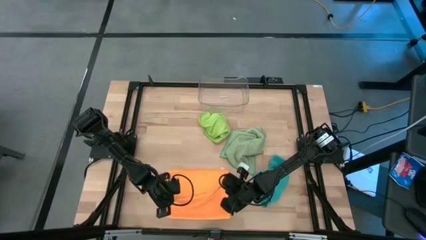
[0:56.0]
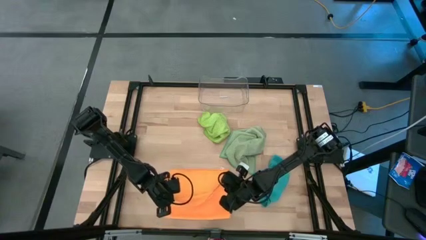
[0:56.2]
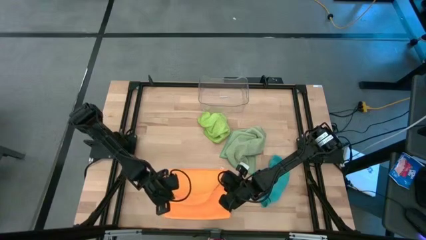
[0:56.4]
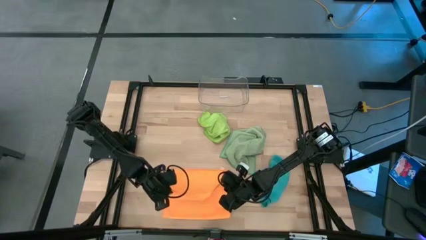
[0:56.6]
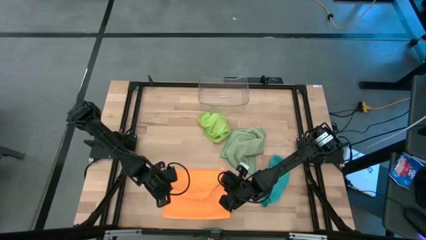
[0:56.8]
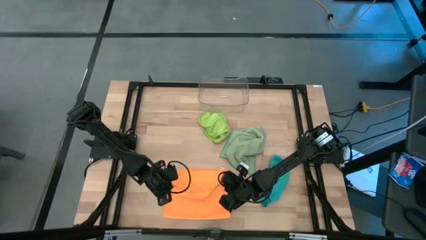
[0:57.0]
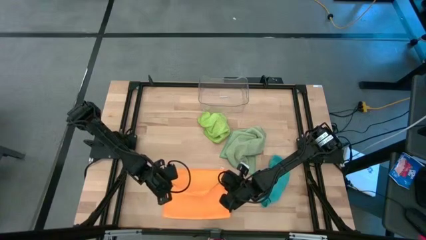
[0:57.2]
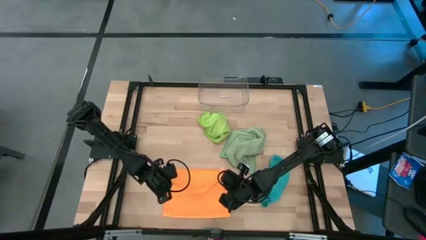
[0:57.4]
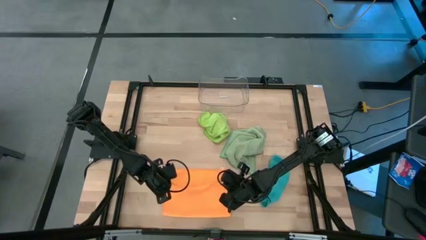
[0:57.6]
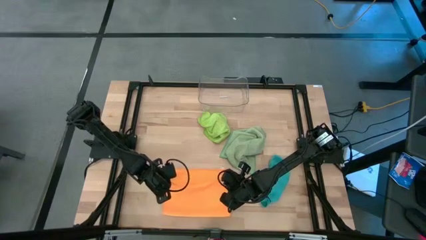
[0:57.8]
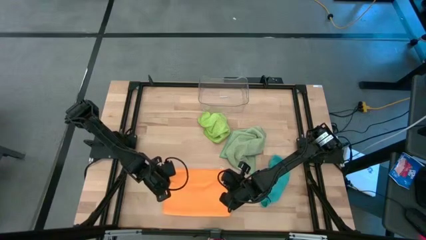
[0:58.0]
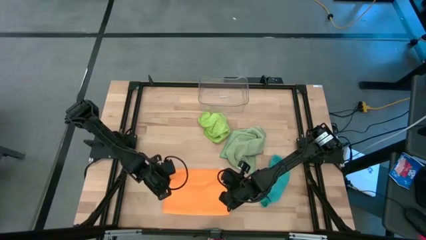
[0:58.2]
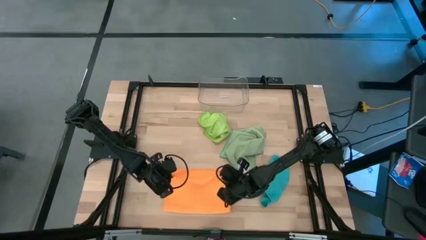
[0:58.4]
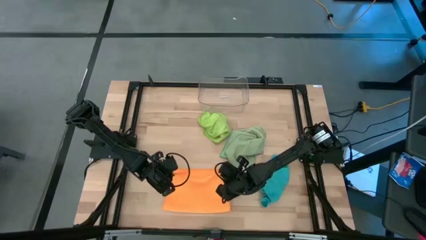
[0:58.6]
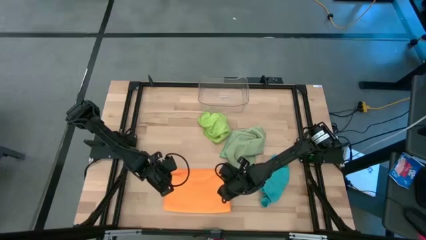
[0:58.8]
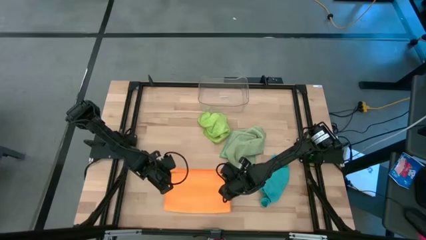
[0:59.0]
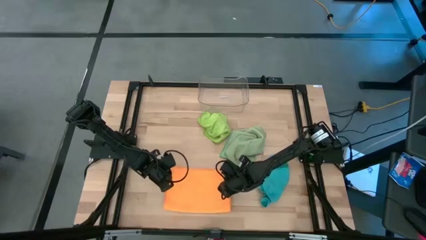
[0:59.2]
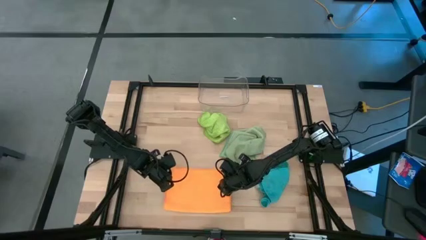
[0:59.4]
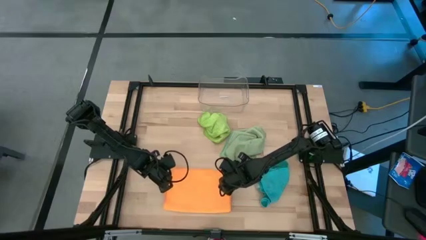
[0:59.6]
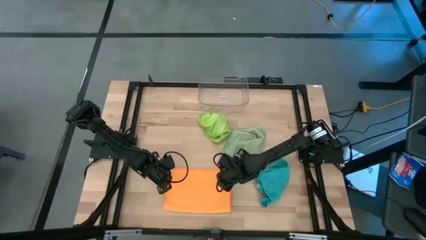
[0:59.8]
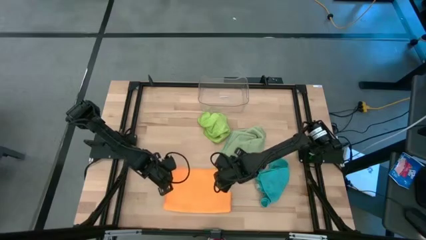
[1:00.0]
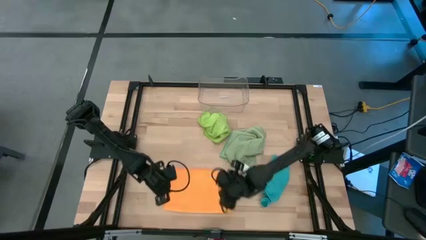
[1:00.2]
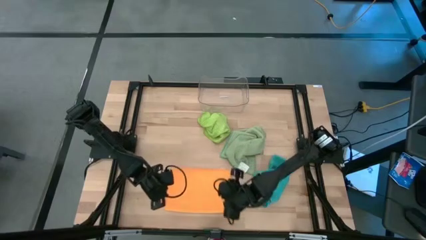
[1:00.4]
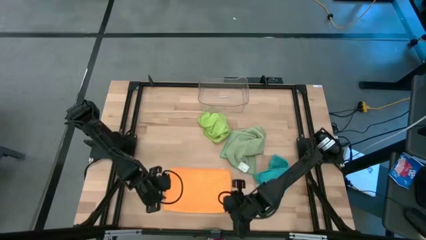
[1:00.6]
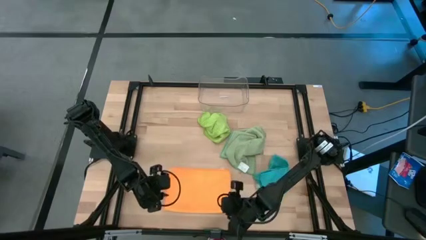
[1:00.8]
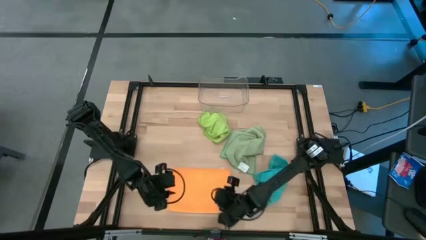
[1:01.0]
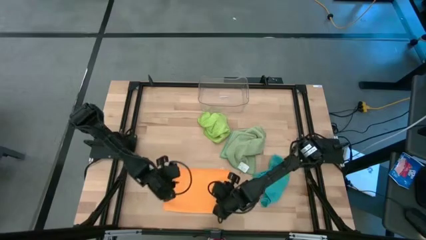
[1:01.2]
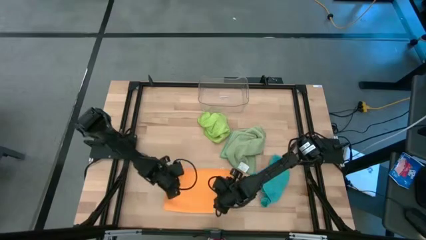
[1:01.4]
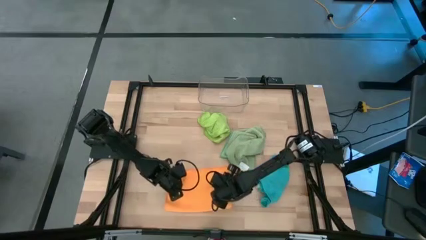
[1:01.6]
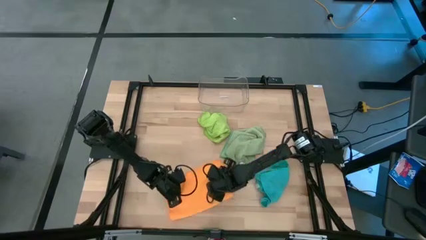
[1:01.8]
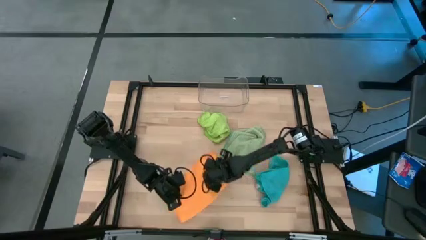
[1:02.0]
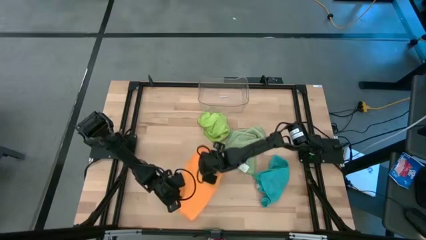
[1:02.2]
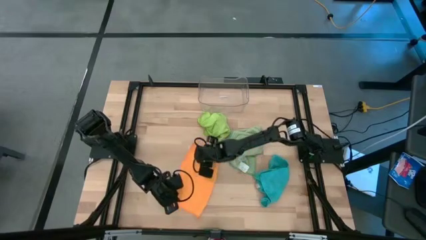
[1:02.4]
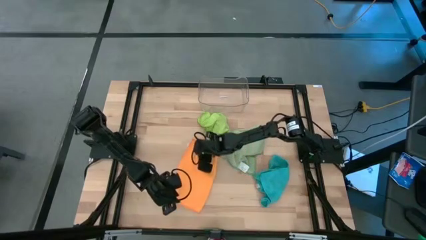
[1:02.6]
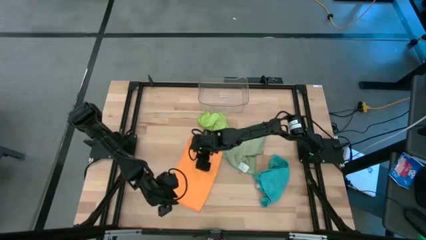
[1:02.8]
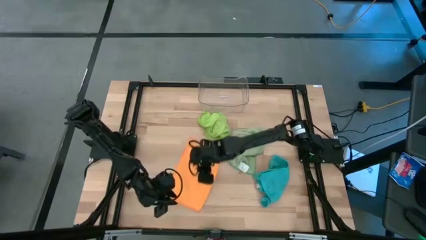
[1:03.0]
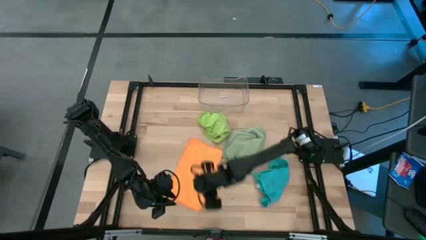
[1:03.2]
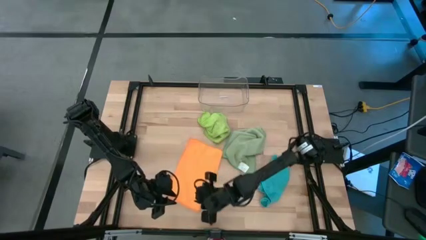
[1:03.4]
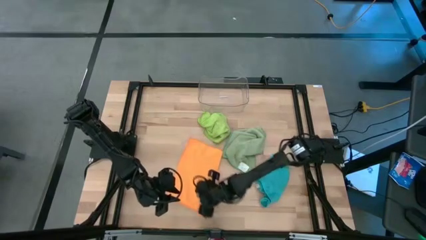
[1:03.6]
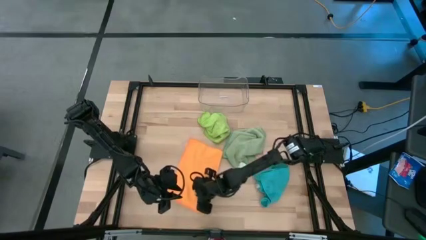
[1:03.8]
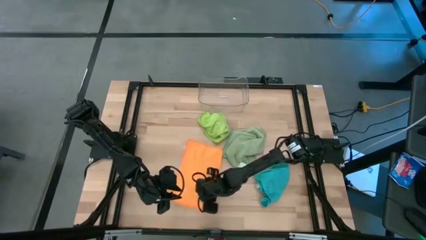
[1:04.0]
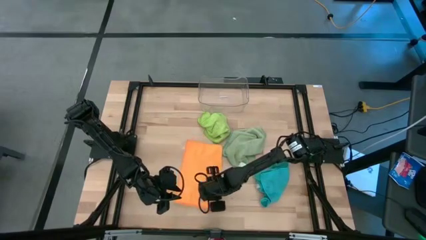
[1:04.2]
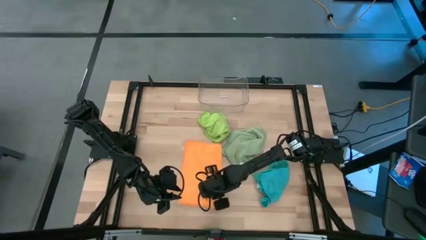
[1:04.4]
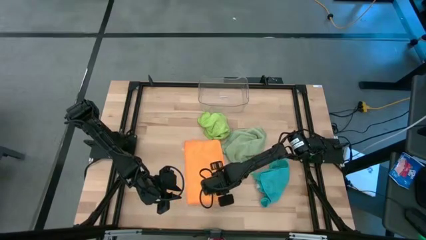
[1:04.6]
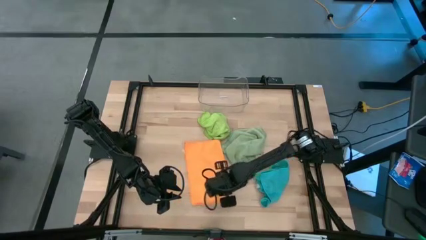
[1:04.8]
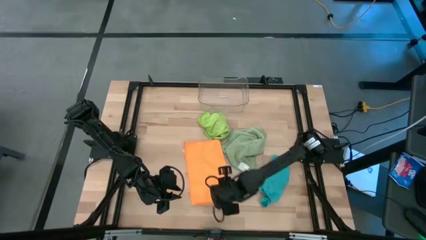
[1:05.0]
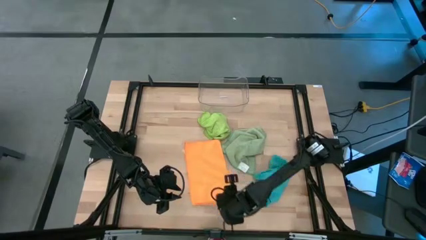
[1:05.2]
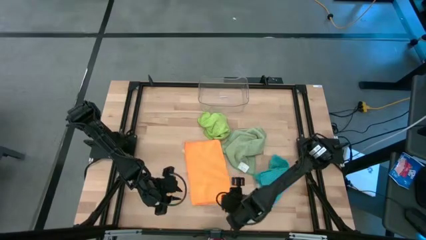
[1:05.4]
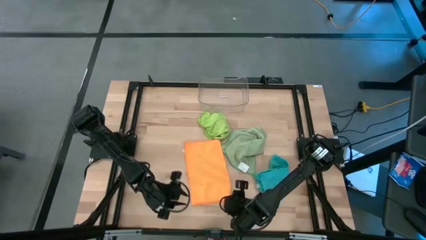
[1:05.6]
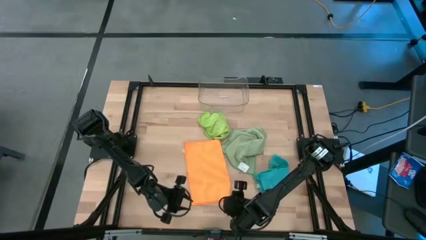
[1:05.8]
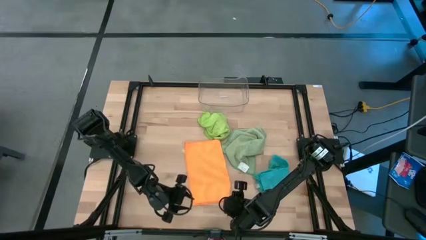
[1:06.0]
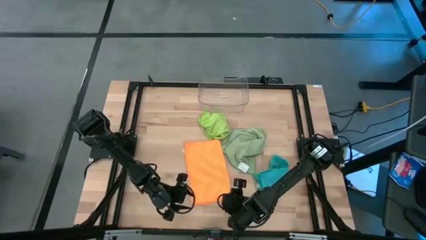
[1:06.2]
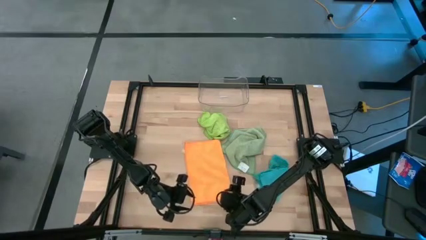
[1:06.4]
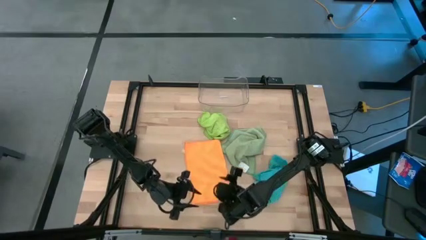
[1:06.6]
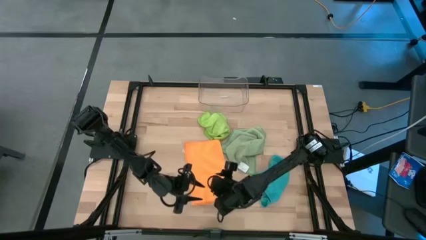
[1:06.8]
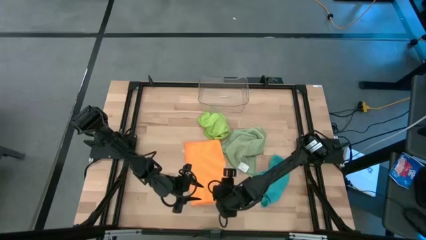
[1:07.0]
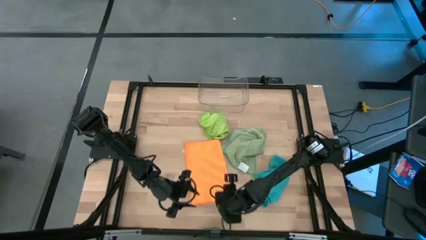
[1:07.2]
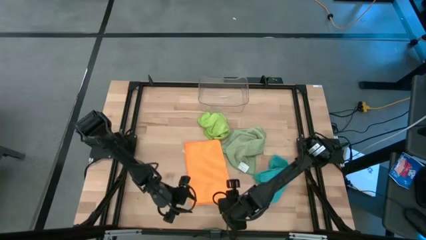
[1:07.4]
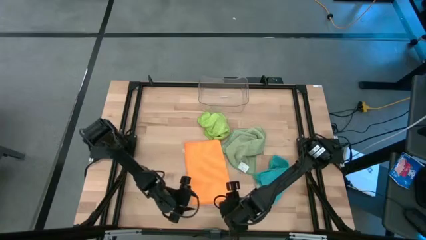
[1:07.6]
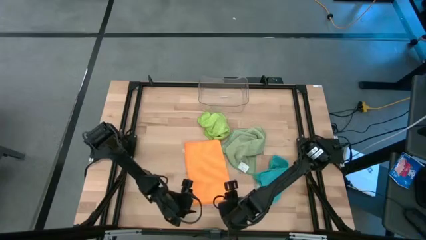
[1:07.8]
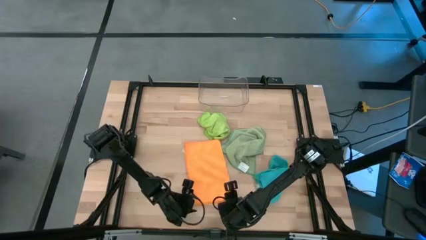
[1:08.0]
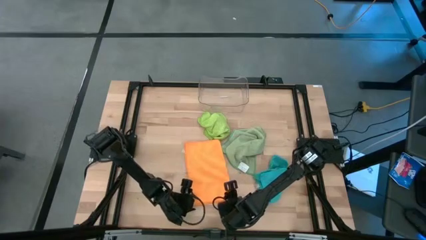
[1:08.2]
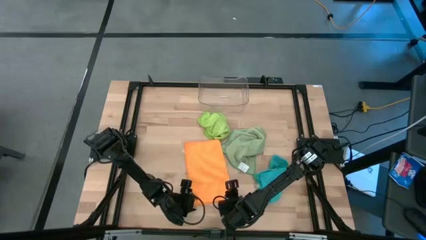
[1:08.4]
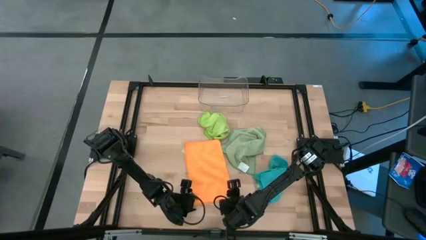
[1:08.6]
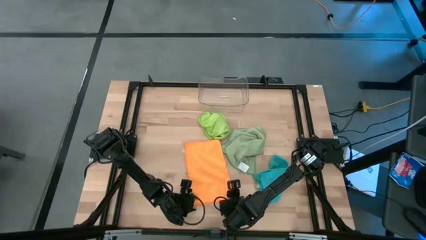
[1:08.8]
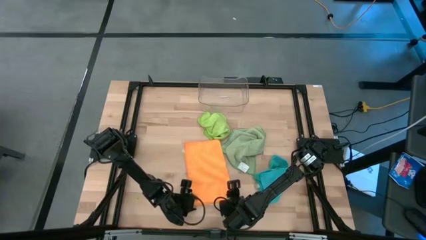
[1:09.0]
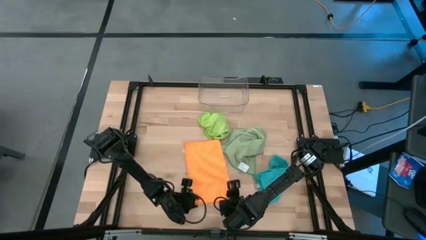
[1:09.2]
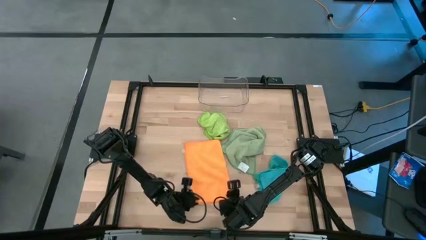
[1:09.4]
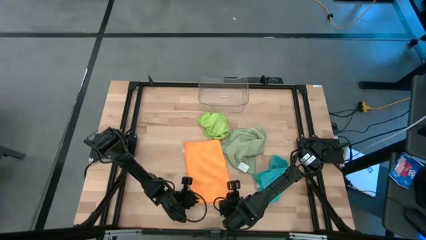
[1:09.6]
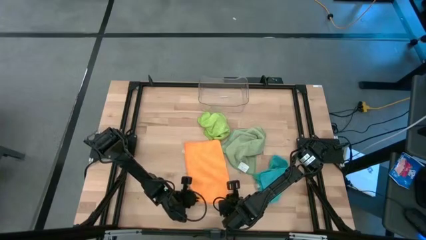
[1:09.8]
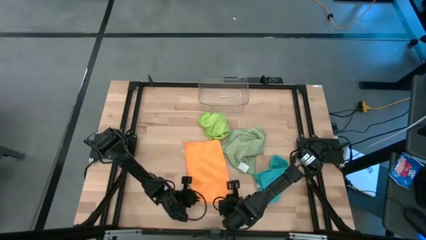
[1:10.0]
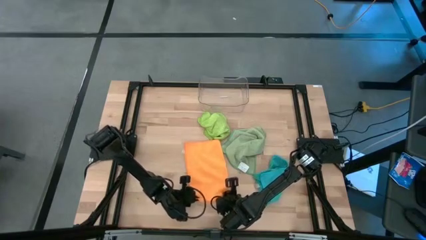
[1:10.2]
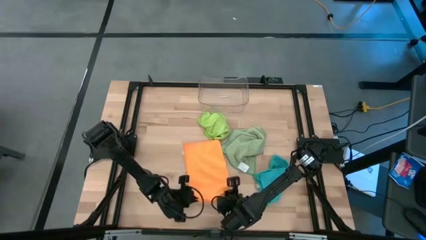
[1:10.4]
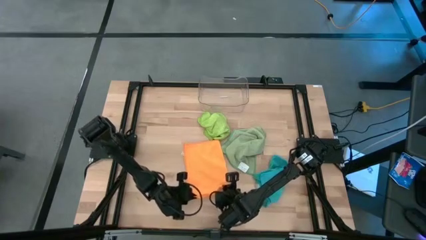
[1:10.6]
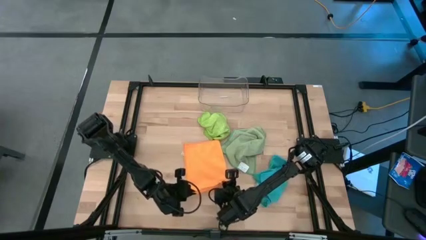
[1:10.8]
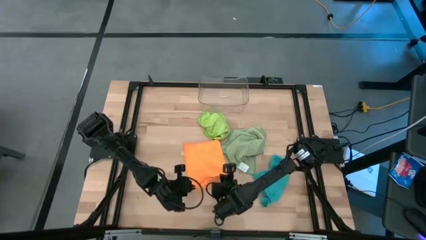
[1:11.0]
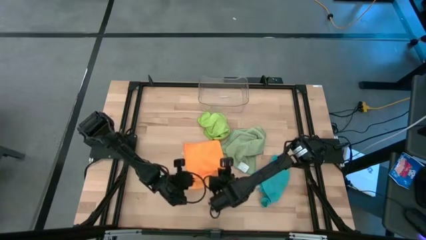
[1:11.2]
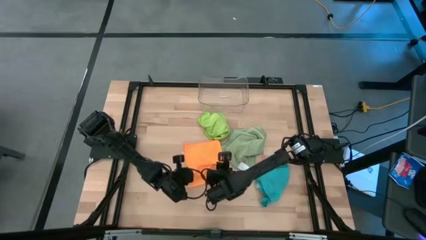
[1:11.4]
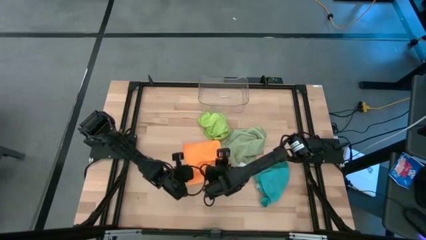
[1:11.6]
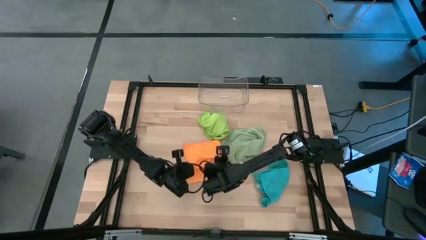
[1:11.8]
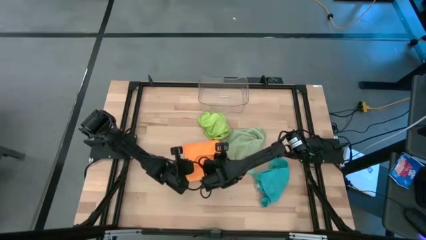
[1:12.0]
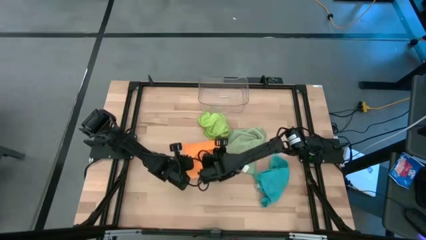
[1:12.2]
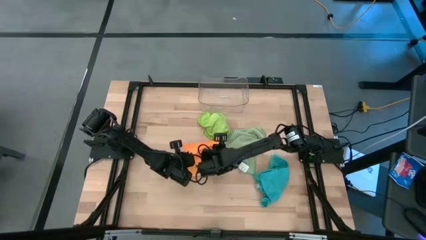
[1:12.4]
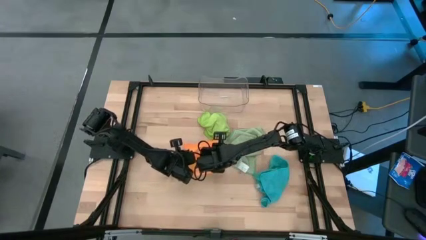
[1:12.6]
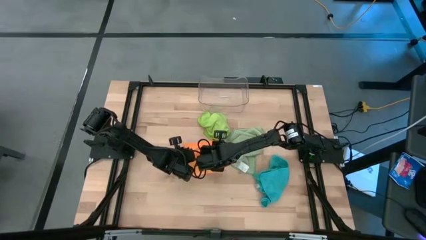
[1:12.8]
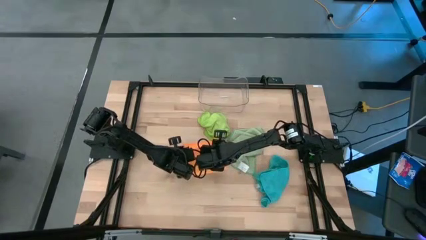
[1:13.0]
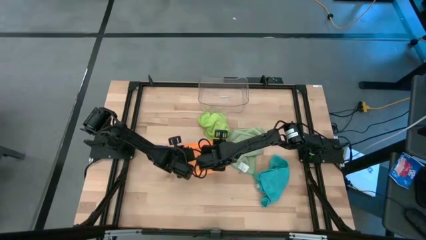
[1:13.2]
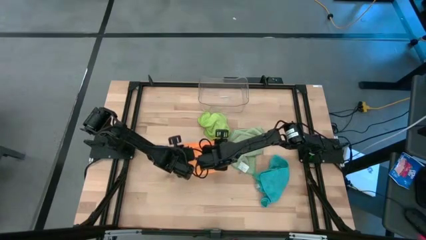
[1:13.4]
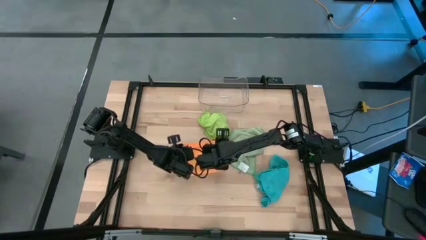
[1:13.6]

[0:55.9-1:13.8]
Task: Fold microfiber towels
Fold the orange microfiber towel
